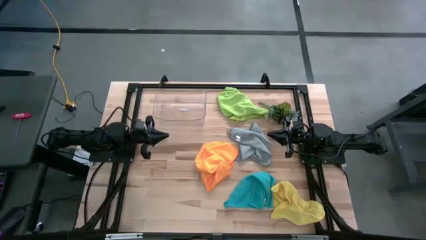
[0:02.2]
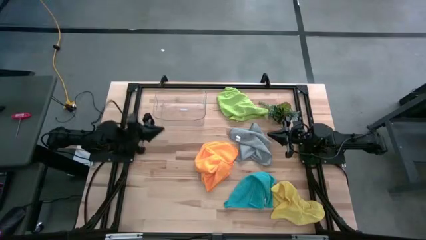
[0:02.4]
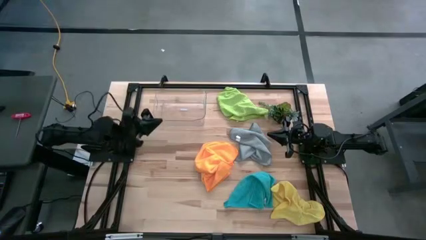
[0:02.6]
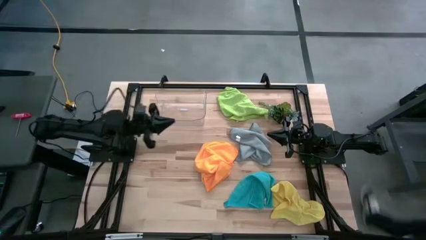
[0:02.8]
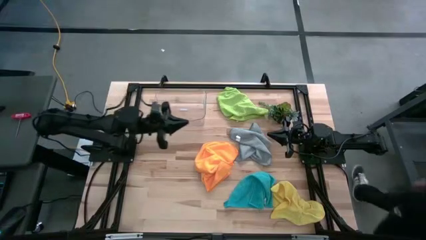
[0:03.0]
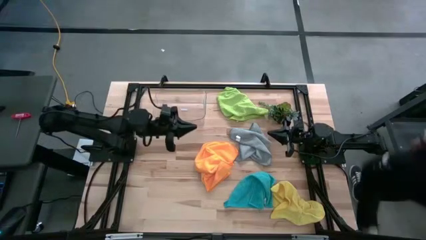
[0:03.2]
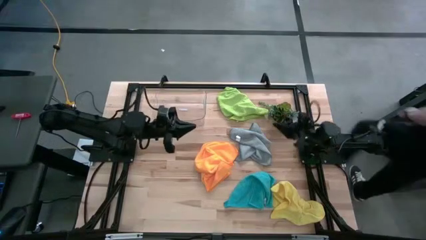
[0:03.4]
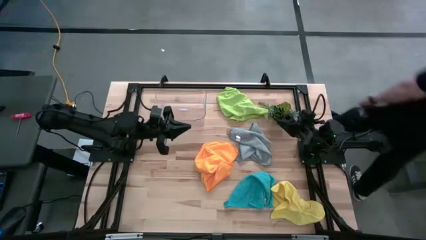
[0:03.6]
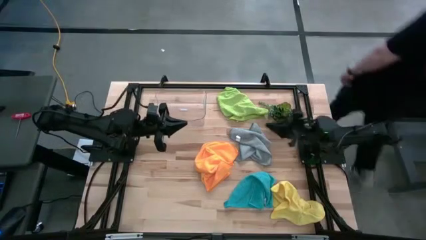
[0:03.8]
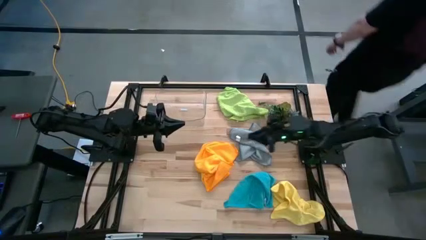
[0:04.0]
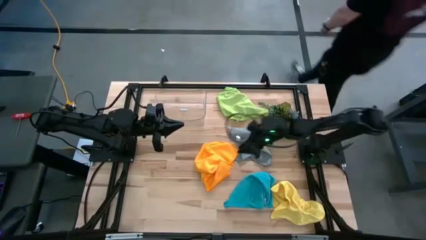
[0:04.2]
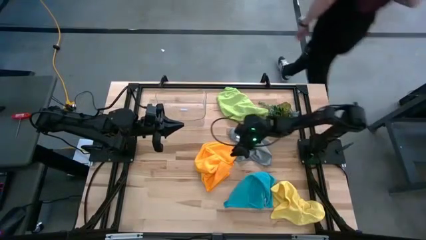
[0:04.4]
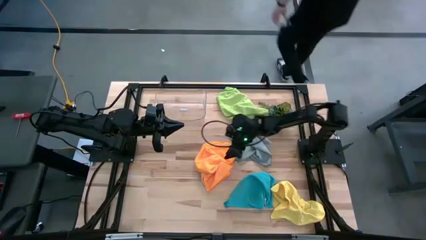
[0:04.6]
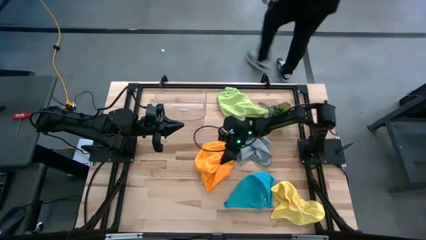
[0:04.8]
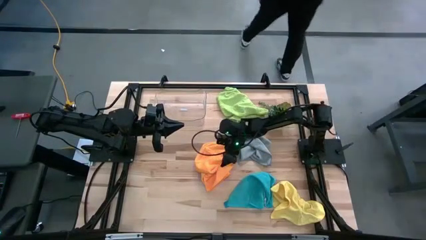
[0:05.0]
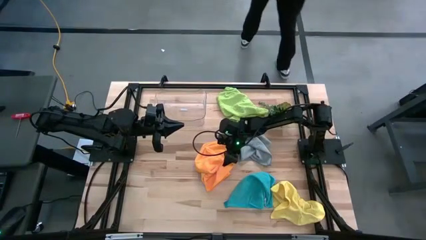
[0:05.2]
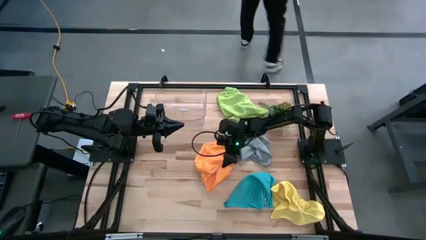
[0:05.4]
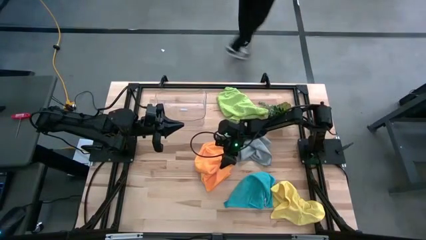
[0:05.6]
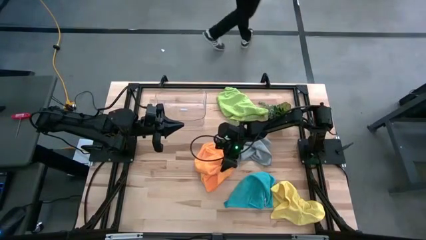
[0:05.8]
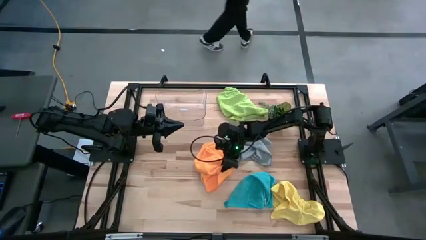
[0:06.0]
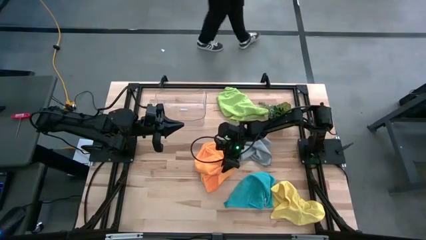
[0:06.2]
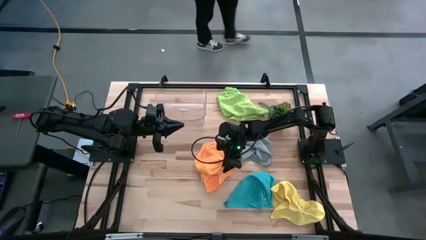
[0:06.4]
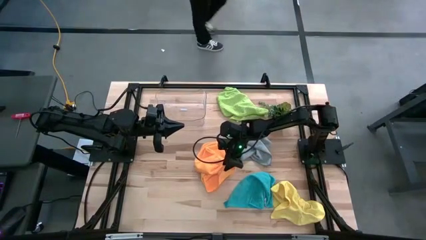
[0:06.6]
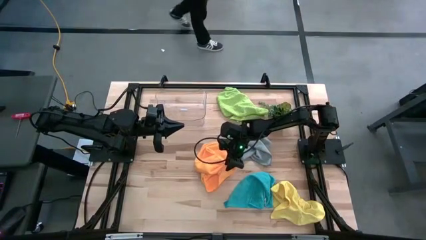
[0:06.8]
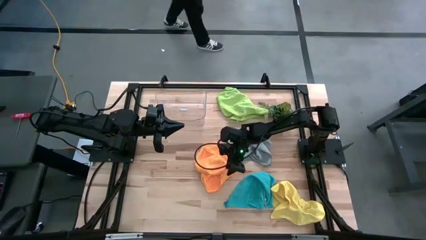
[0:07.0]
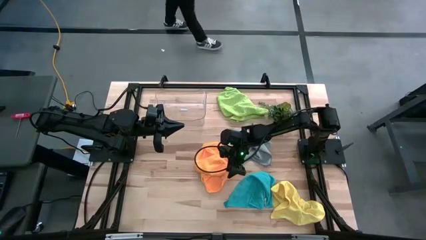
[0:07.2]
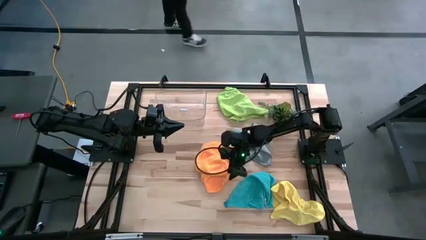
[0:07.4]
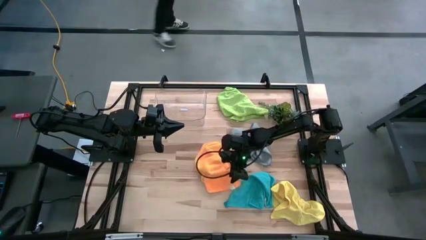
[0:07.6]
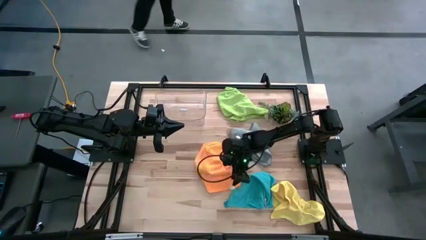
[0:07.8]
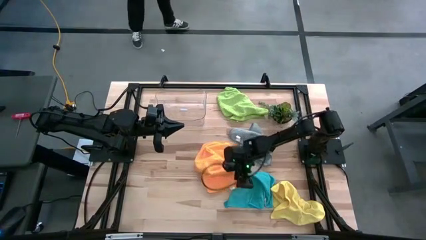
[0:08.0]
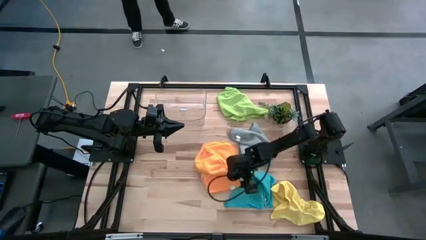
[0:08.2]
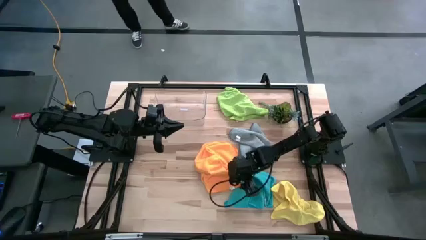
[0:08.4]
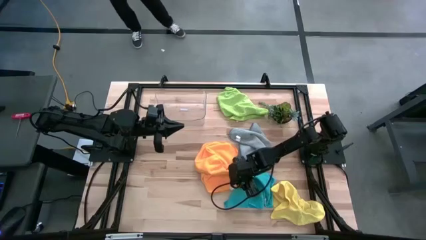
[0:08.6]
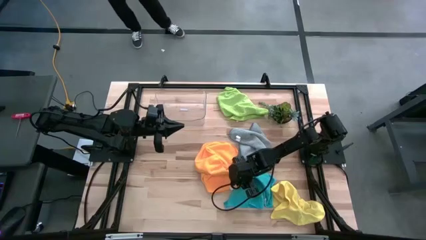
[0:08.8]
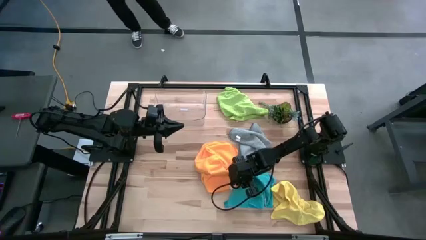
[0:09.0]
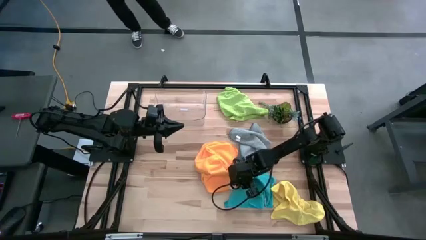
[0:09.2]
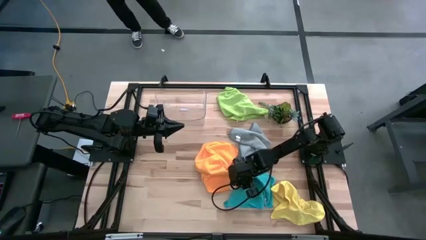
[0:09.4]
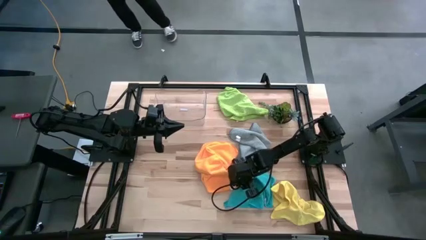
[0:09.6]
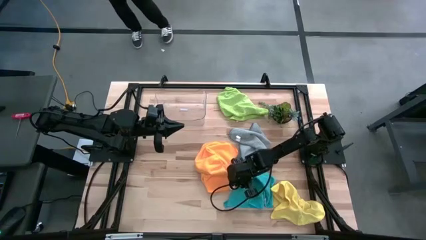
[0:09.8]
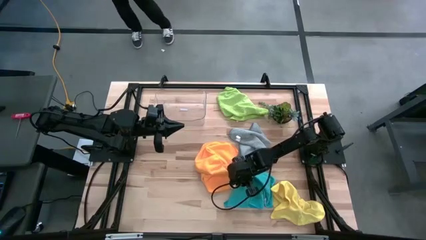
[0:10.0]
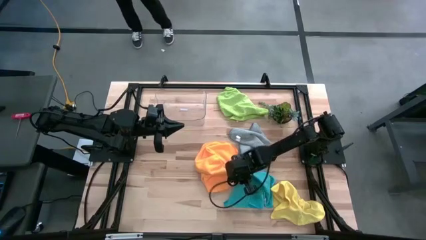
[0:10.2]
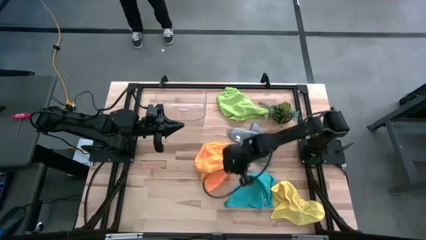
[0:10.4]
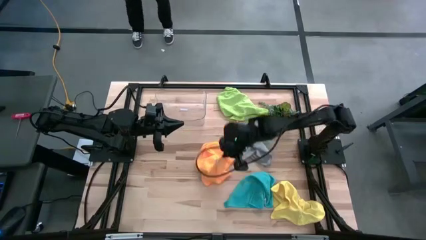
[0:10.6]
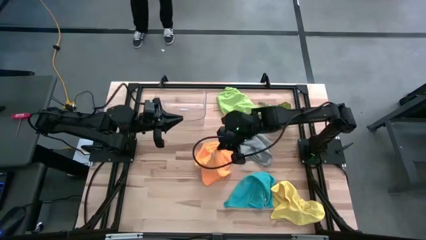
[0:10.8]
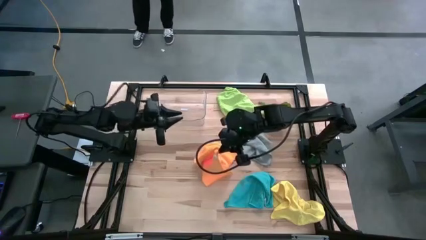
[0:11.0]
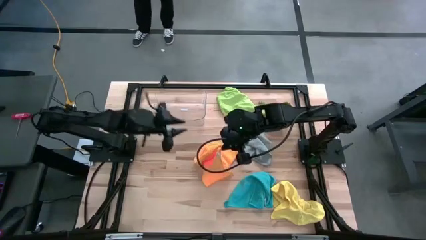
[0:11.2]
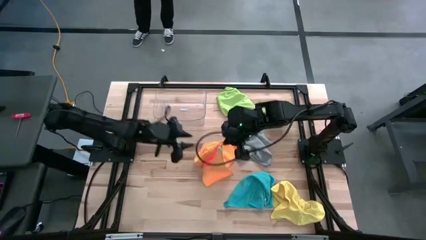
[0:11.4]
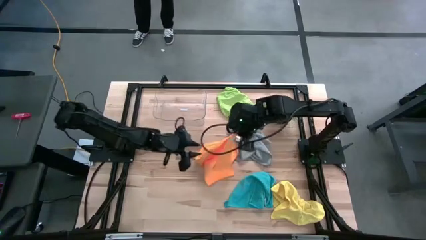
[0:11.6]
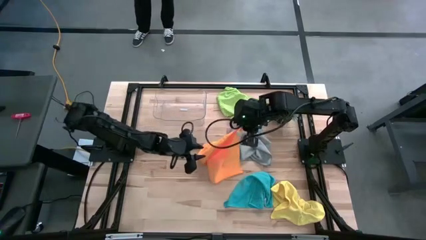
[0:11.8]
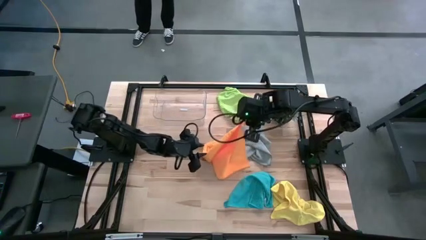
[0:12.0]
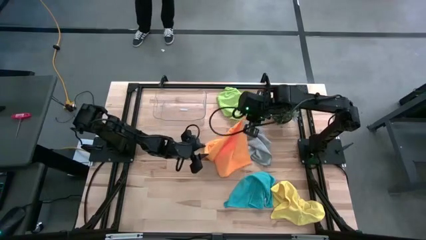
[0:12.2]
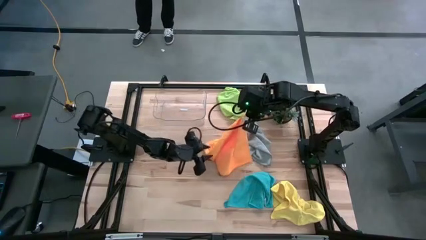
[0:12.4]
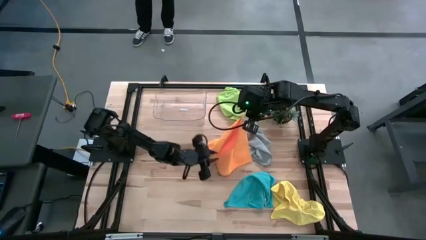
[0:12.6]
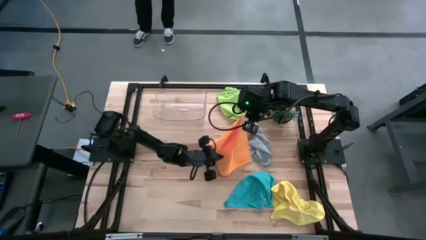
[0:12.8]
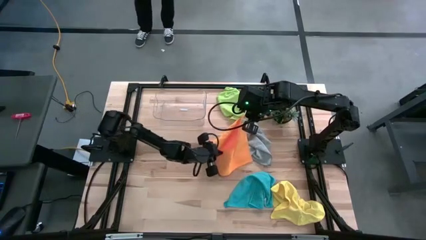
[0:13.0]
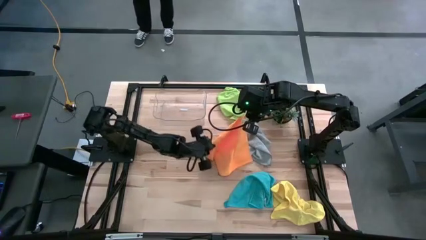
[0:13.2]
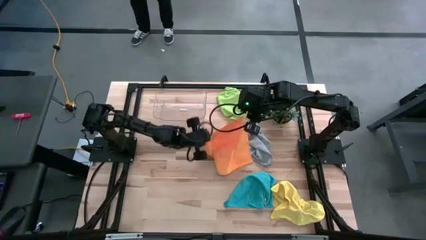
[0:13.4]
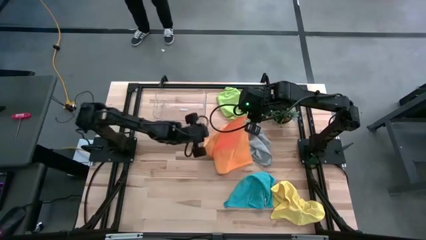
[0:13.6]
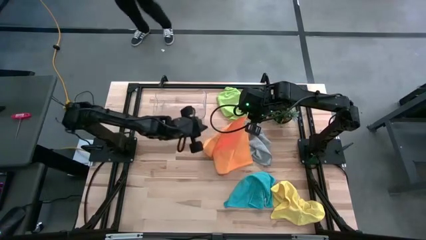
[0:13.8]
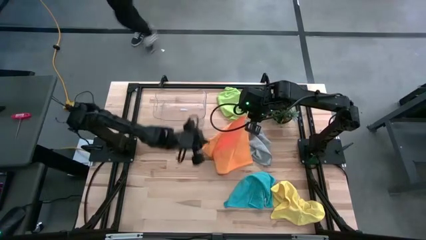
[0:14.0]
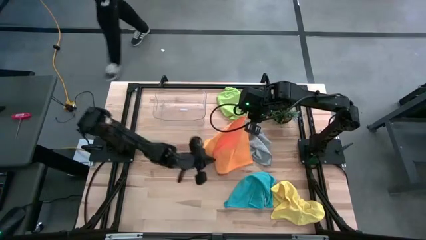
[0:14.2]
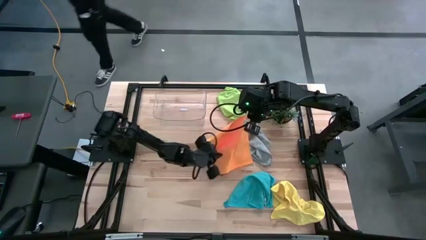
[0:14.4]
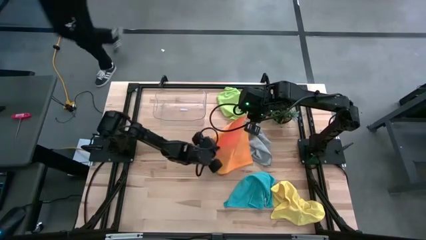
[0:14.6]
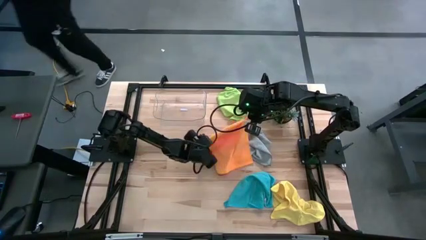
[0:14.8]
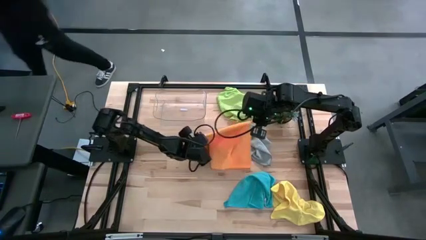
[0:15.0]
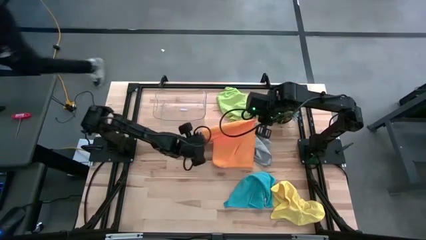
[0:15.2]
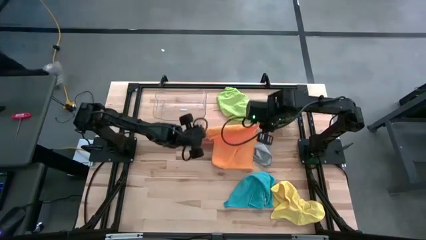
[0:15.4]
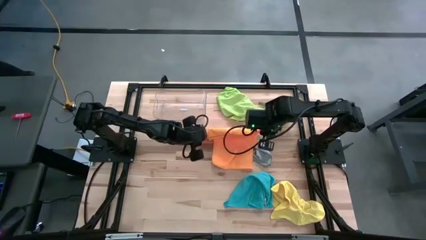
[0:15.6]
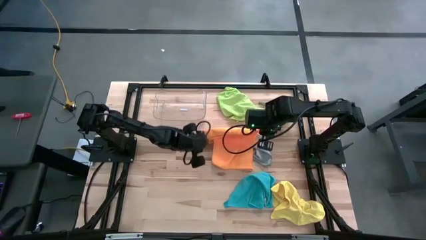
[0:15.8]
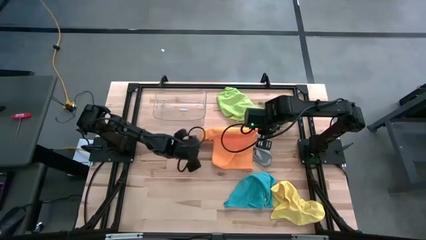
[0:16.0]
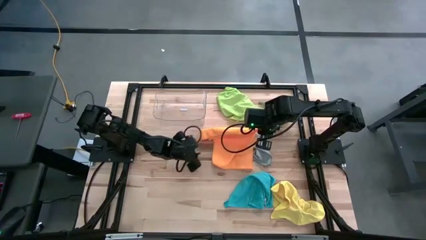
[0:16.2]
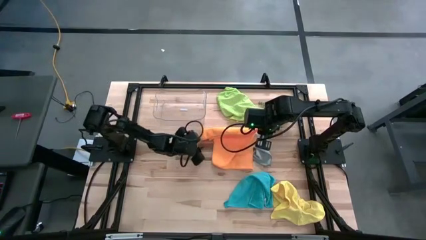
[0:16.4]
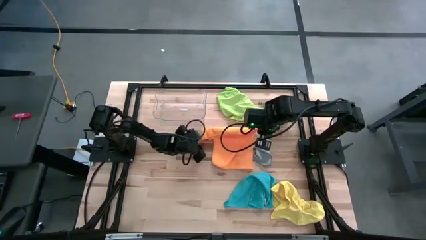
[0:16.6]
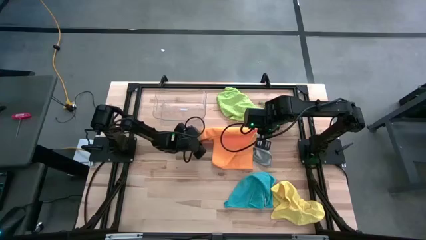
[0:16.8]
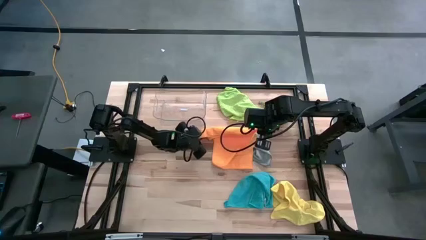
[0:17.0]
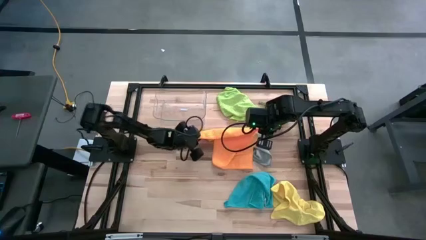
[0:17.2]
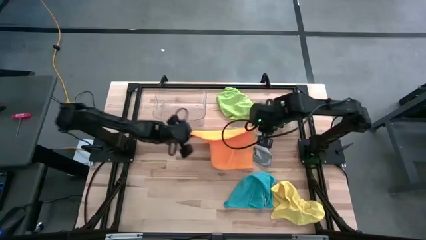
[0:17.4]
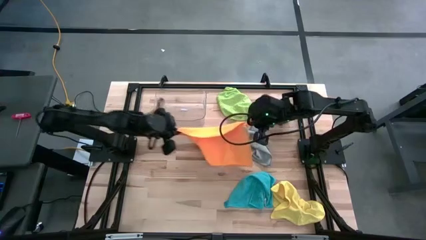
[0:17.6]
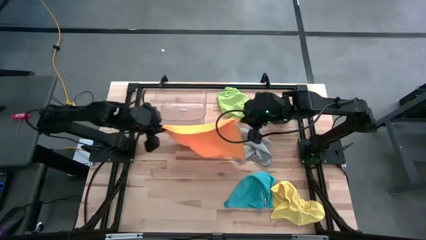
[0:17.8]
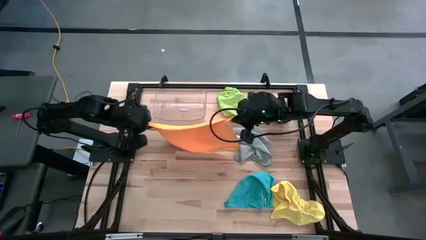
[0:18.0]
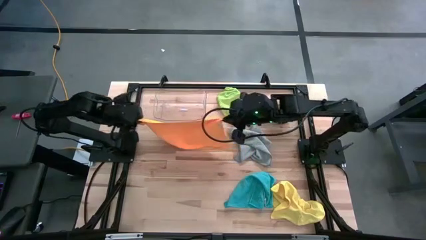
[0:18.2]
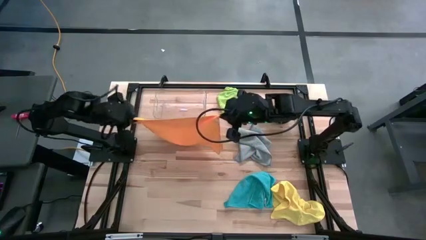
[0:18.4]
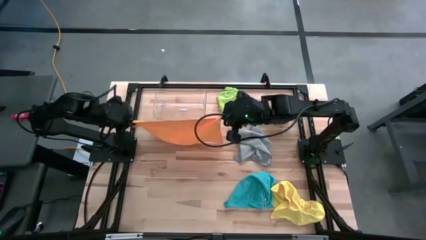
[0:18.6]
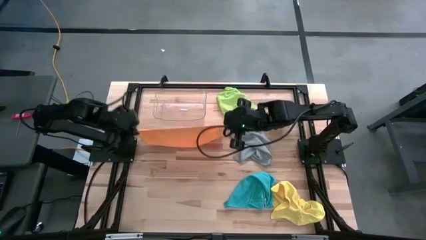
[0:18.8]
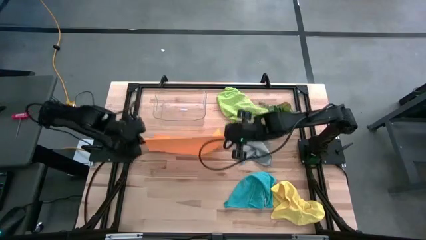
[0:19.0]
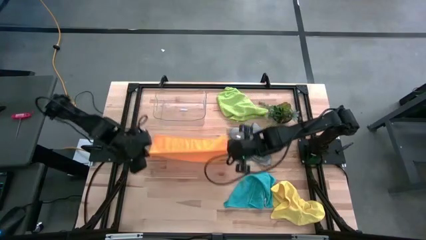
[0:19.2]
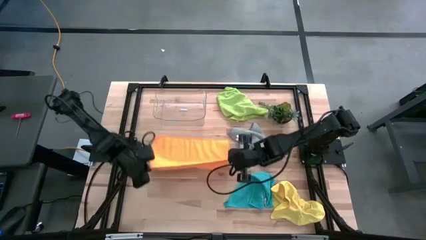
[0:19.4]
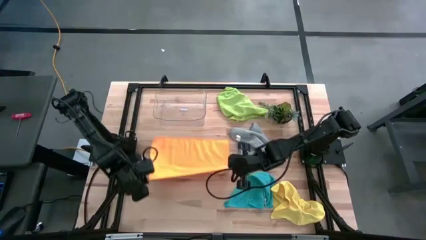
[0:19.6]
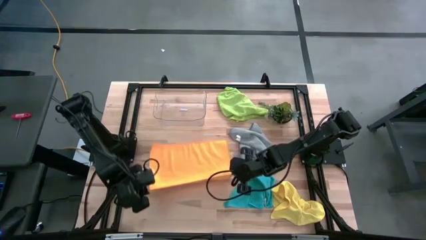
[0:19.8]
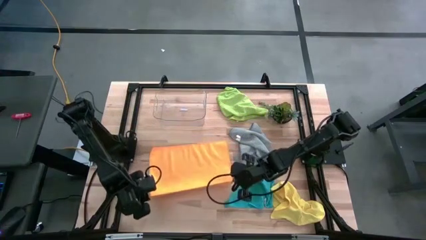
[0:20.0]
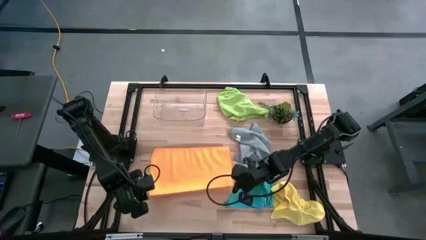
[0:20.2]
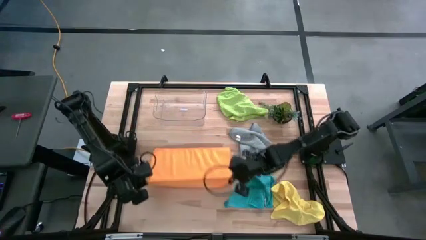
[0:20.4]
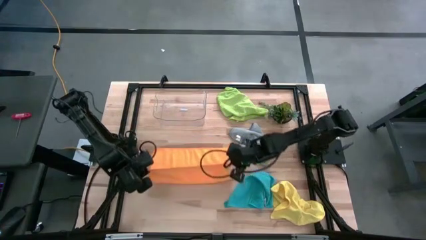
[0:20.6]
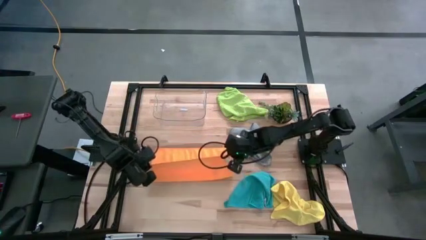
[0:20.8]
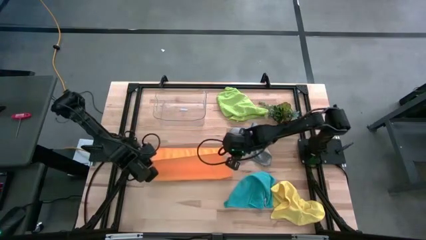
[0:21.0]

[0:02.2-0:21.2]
Task: Fold microfiber towels
Fold the orange towel
